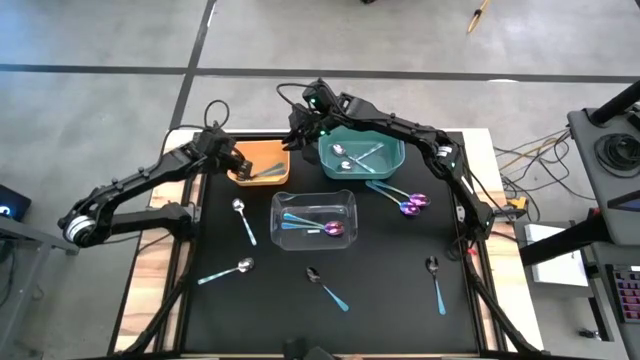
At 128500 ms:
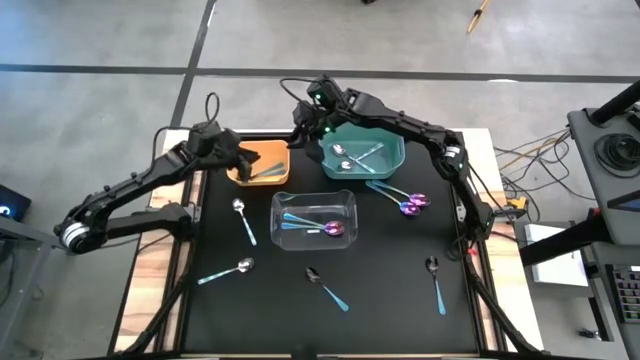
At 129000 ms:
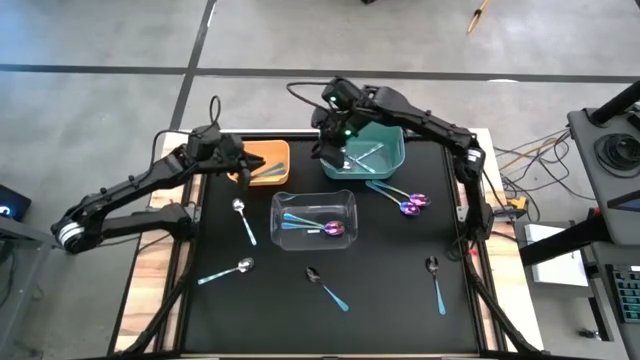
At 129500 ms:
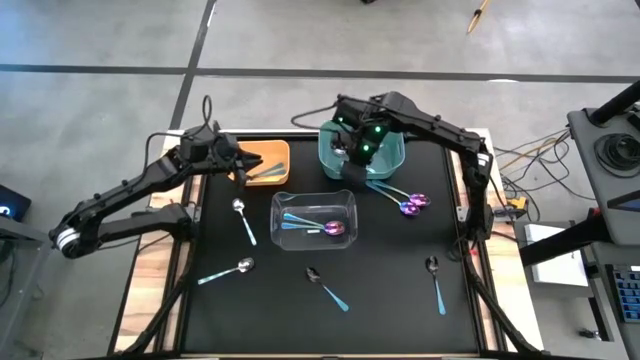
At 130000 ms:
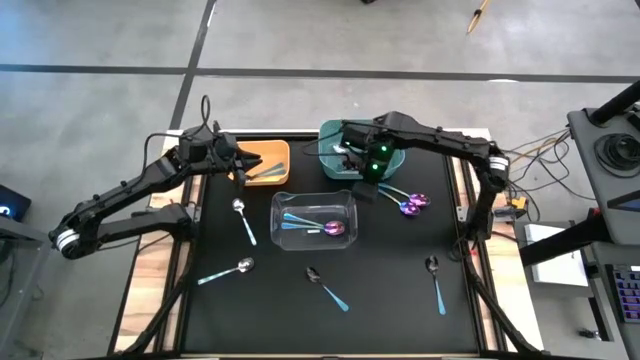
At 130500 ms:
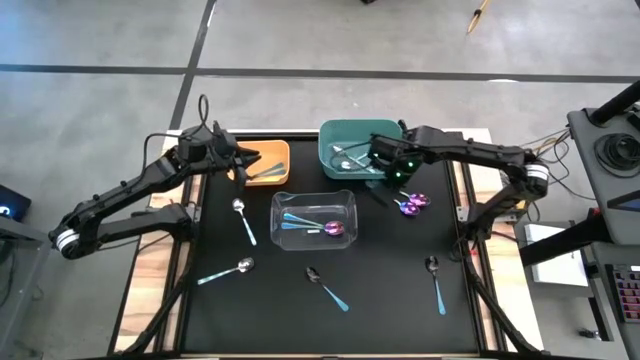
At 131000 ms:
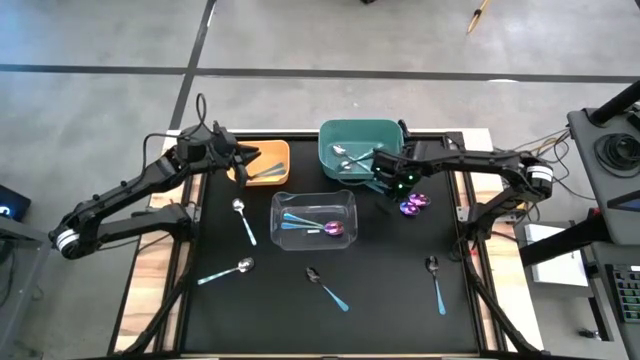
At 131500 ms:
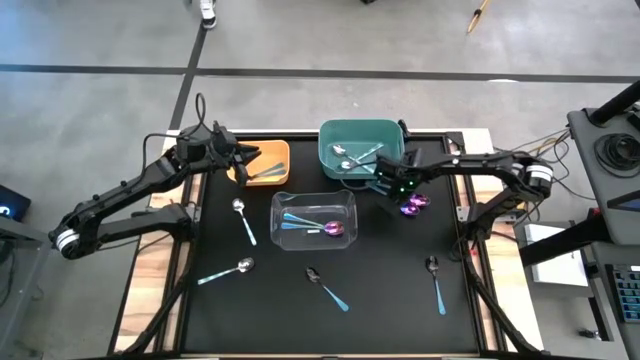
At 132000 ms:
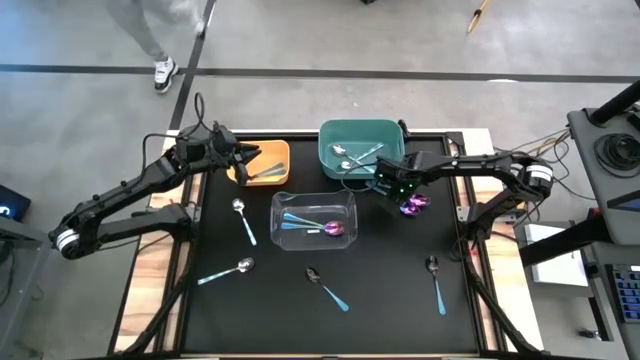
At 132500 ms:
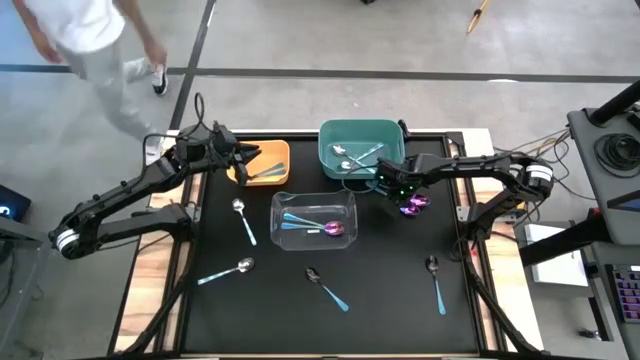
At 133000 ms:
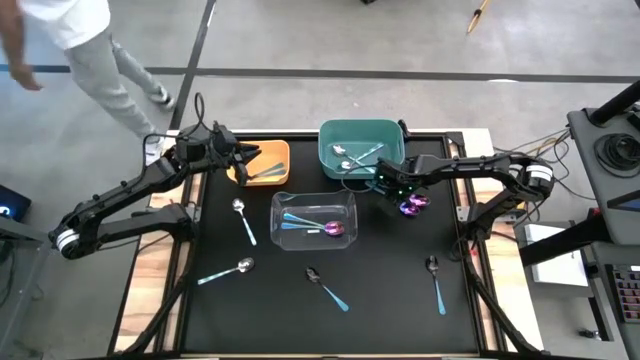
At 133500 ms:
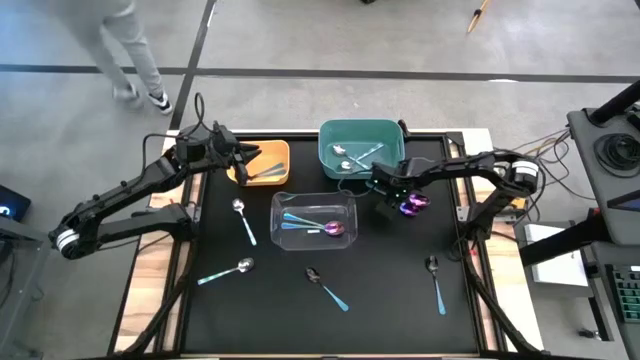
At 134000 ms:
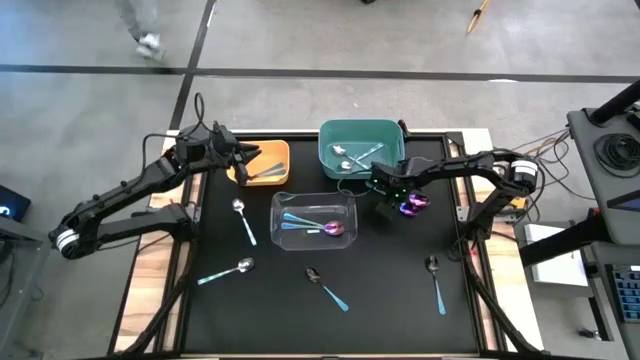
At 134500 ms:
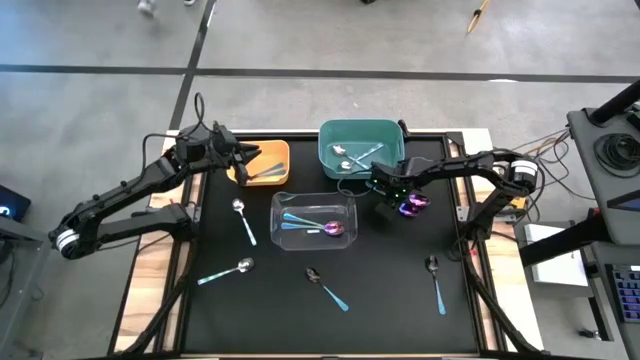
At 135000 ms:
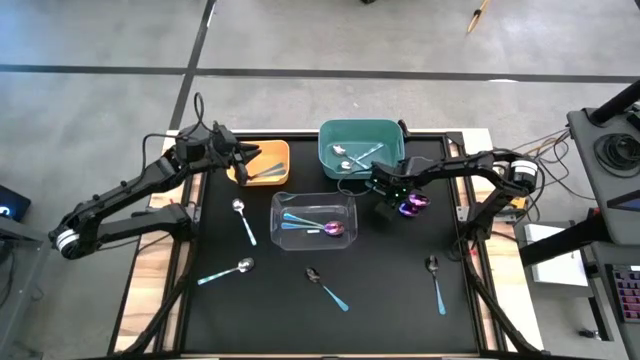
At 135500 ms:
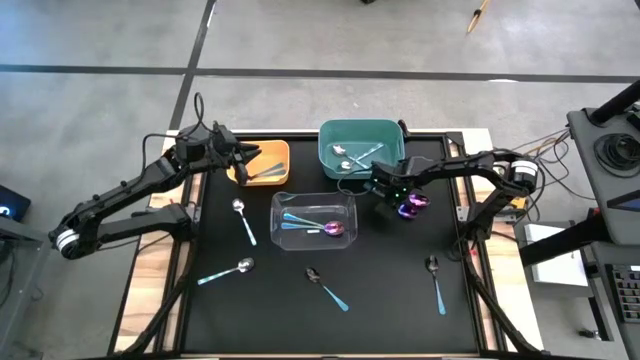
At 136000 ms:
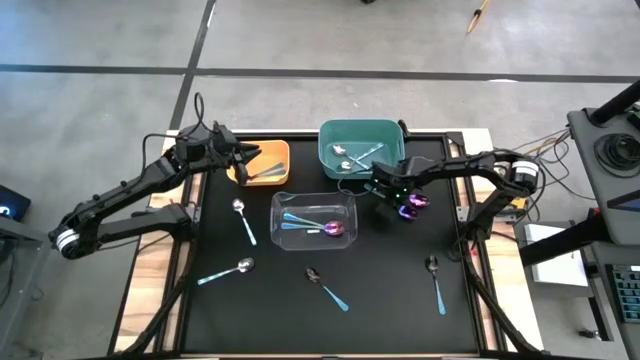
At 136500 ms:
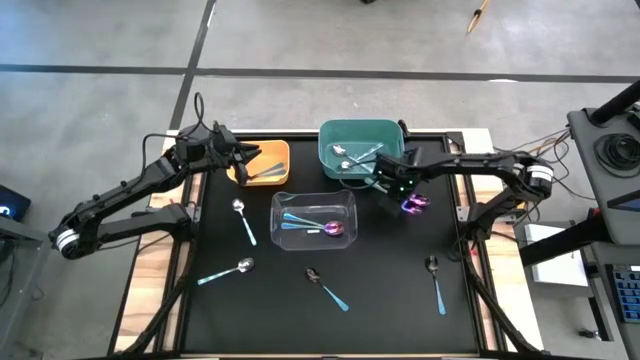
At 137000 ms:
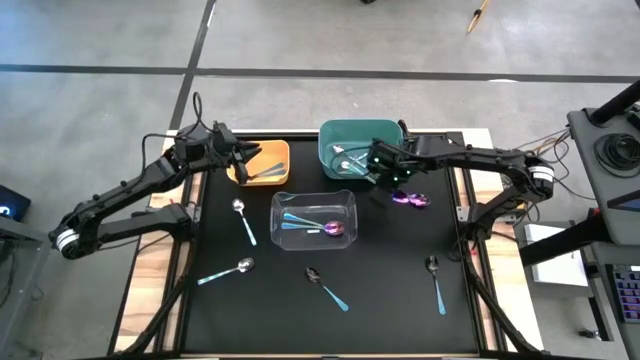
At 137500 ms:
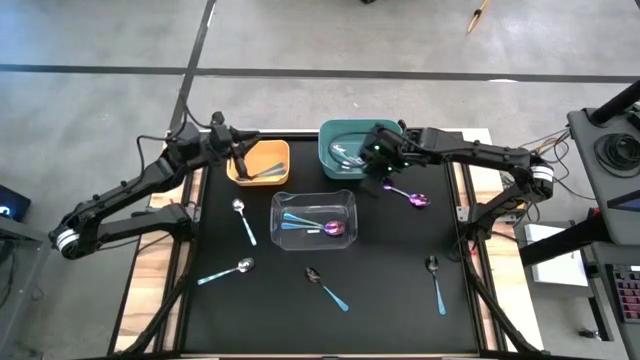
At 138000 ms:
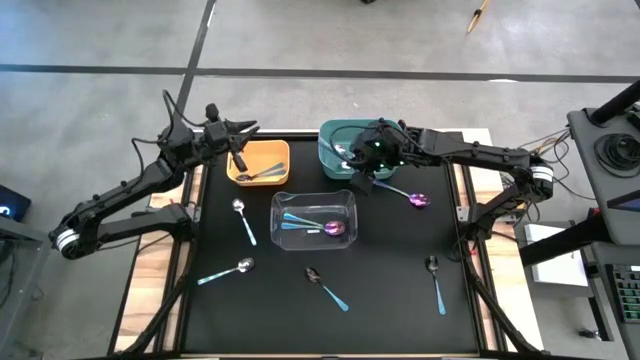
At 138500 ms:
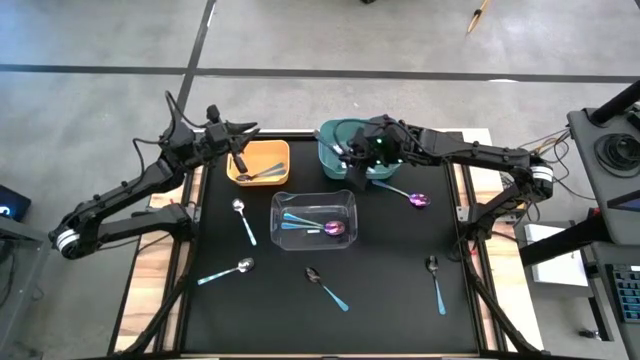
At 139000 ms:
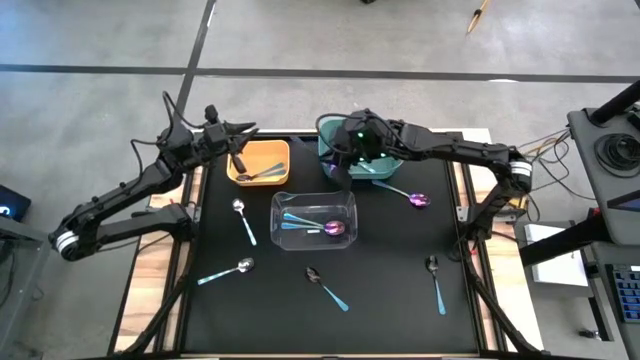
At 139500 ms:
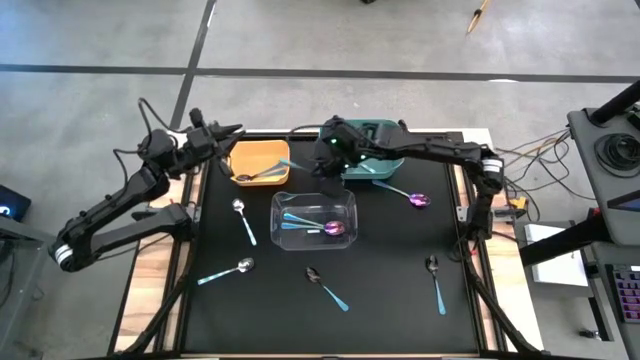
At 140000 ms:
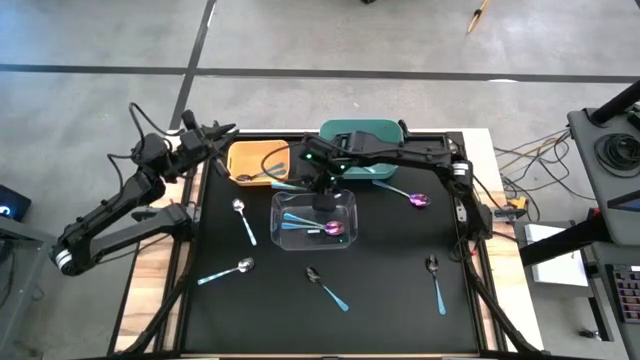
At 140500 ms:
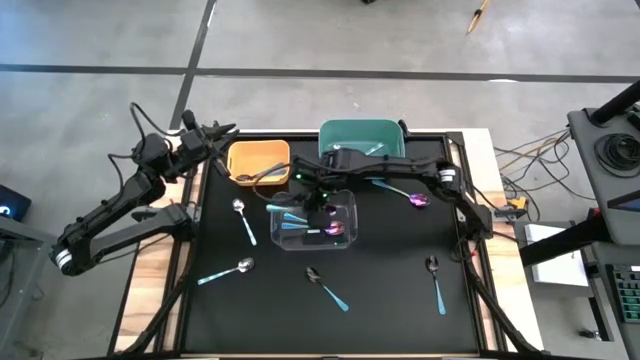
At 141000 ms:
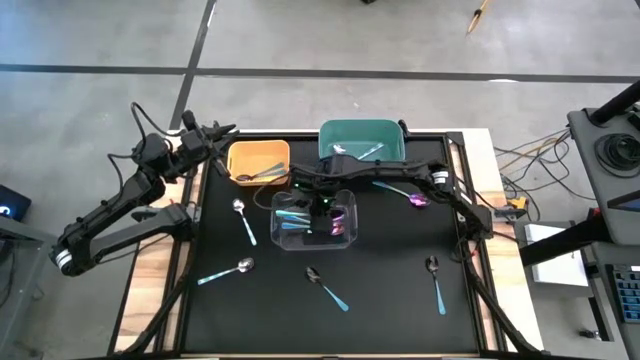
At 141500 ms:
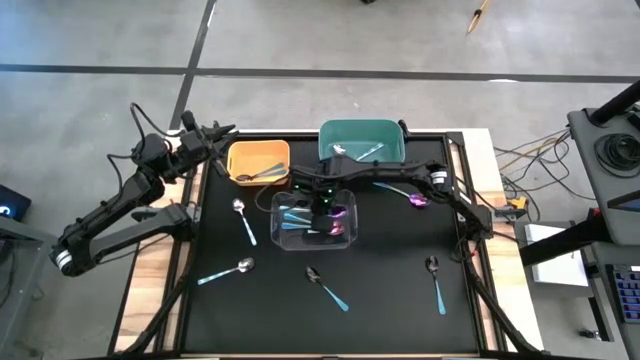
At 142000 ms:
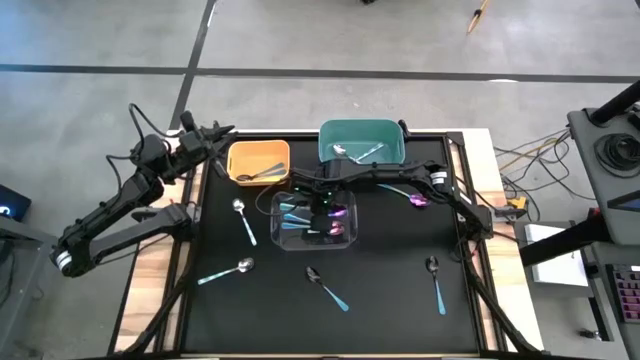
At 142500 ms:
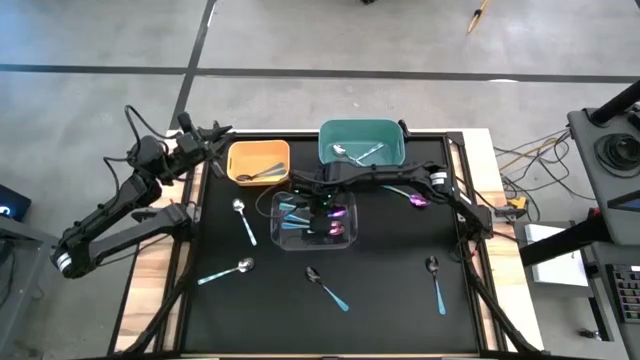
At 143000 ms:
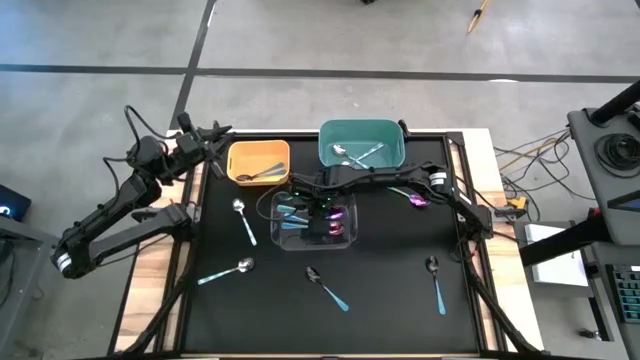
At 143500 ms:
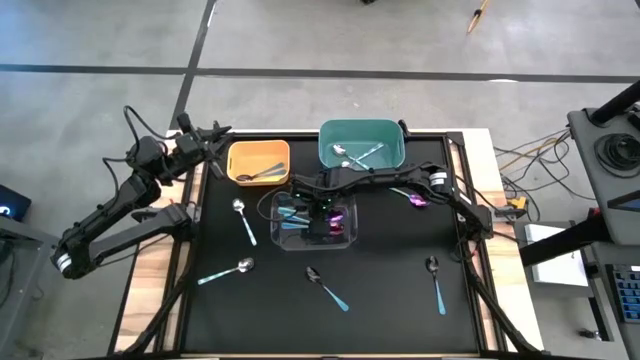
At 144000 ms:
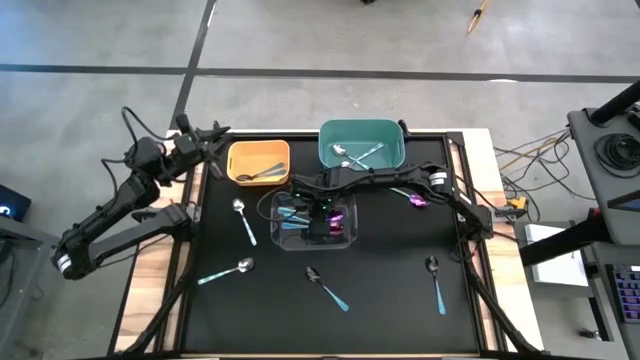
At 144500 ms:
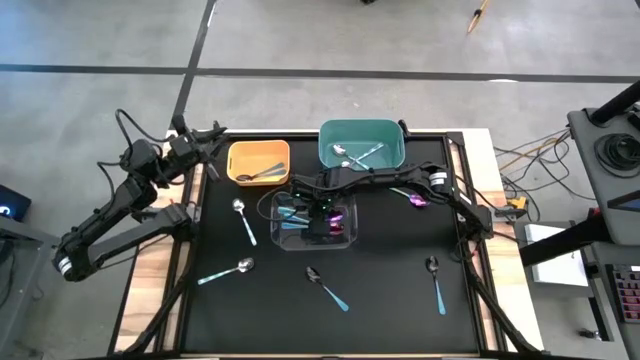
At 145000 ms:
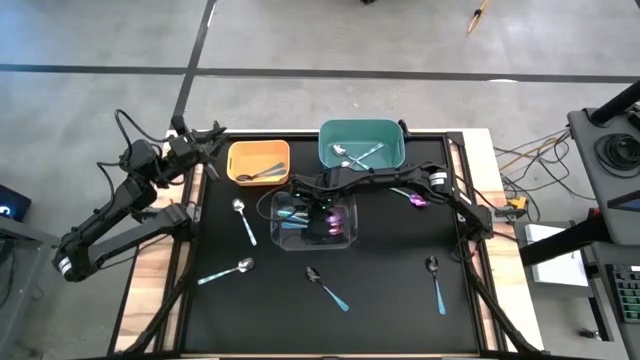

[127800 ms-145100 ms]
Task: Sort silverware by color (type)
Put the violet spoon into the transparent bin

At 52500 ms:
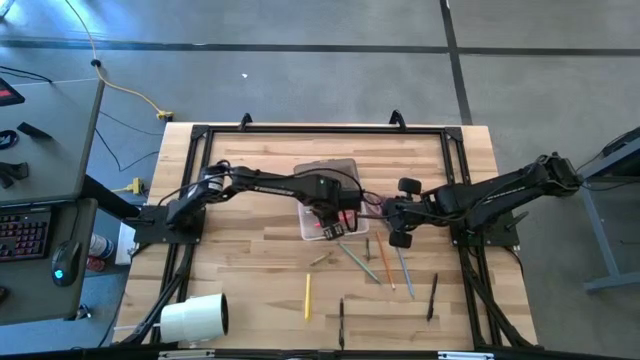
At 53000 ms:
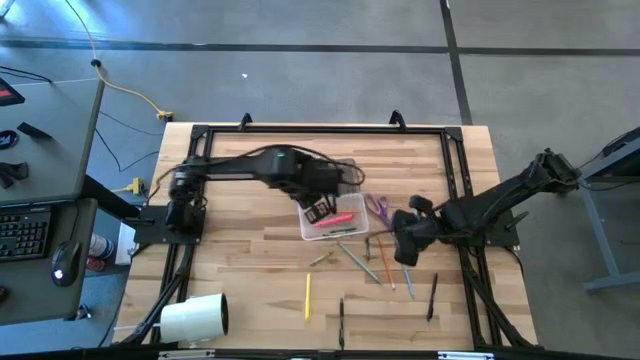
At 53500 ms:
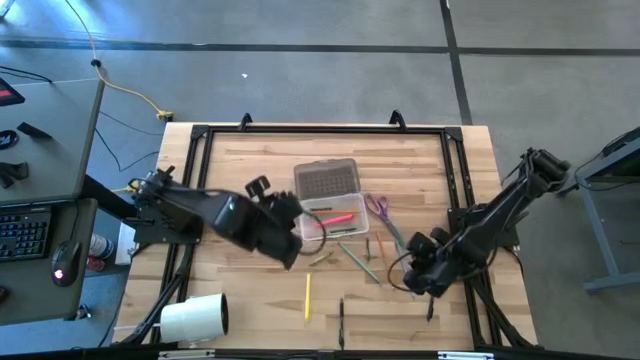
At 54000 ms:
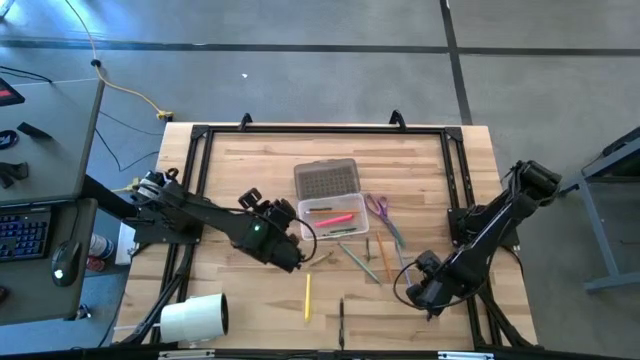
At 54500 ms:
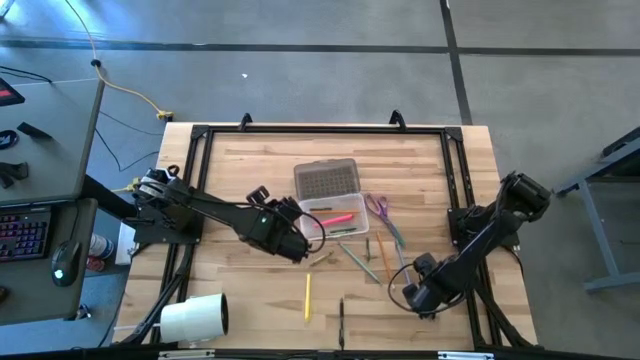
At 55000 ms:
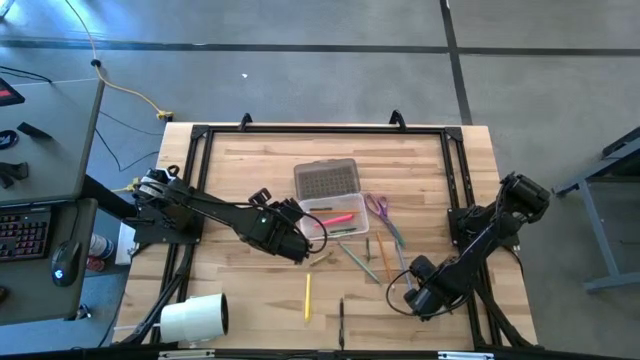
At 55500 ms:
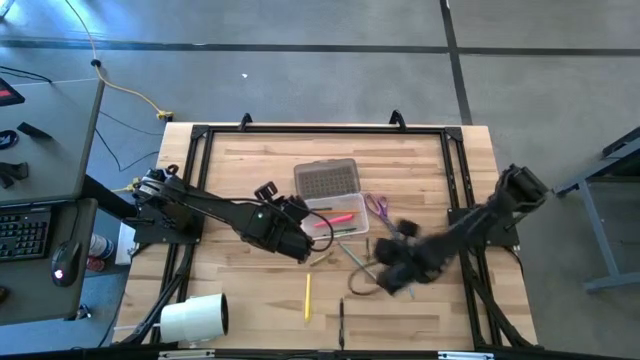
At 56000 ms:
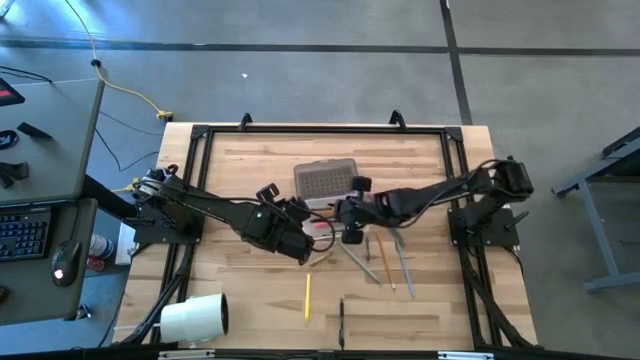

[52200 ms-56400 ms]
Task: Pick & place school supplies into a supply box
Put the black pen into the black supply box
